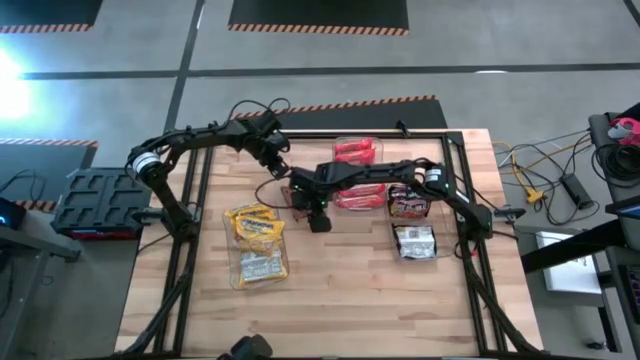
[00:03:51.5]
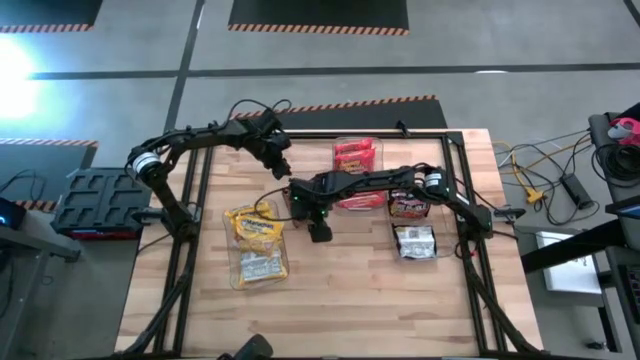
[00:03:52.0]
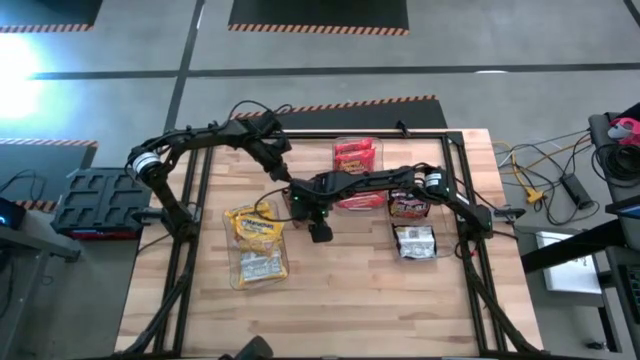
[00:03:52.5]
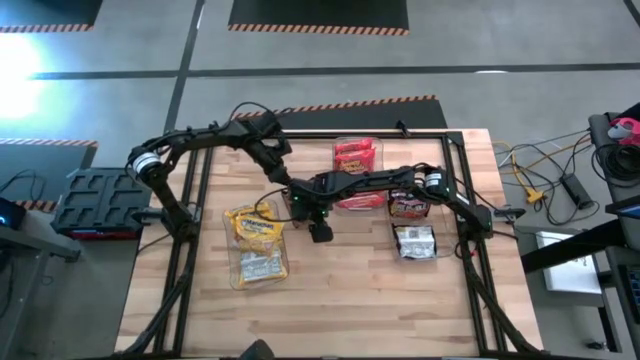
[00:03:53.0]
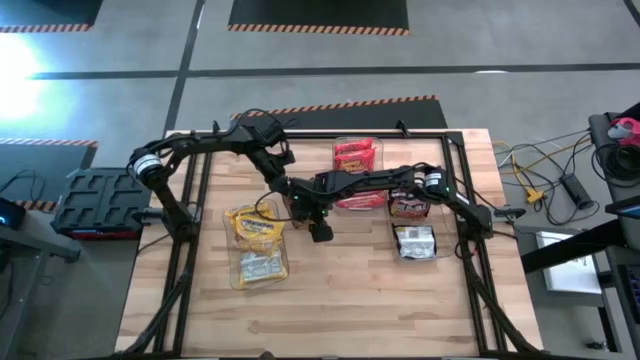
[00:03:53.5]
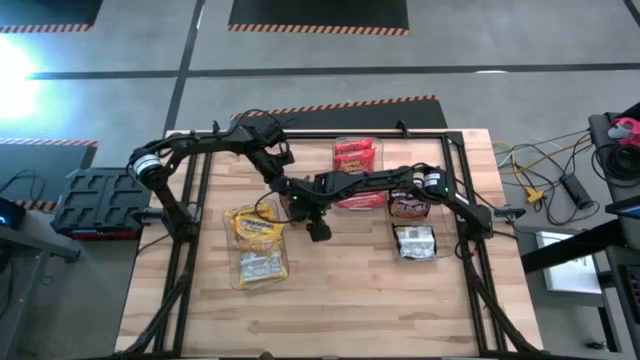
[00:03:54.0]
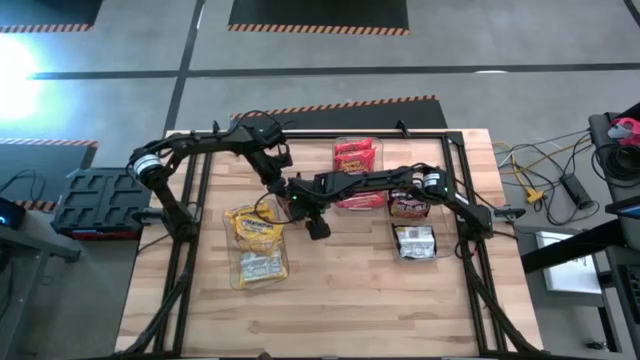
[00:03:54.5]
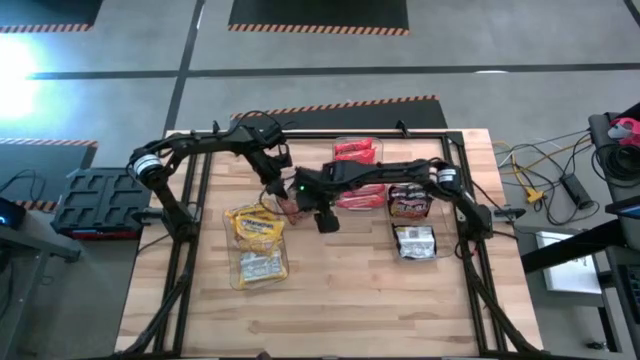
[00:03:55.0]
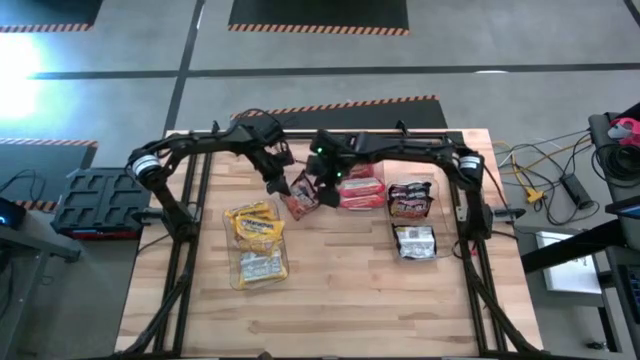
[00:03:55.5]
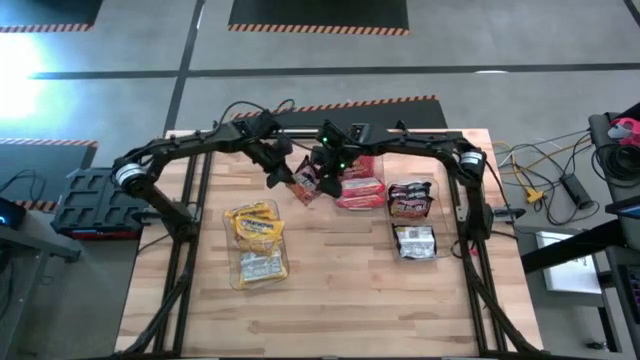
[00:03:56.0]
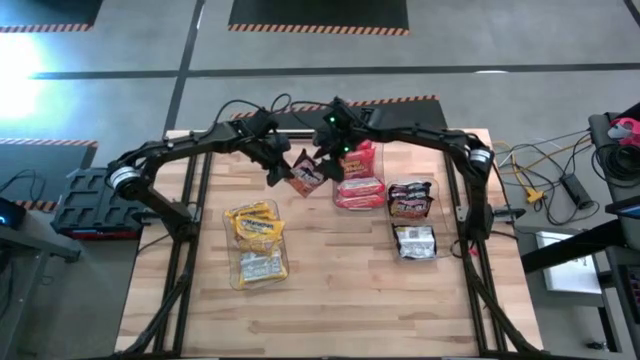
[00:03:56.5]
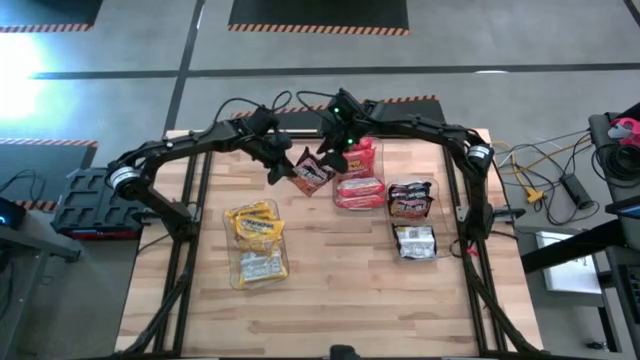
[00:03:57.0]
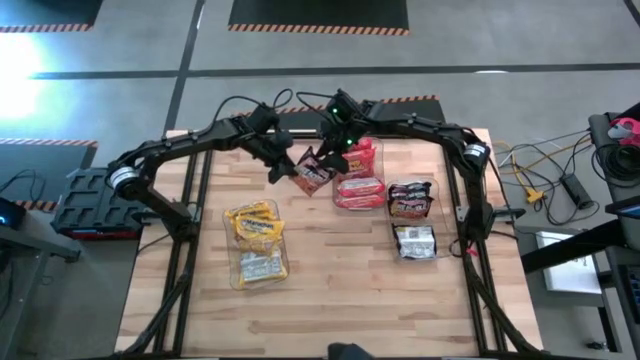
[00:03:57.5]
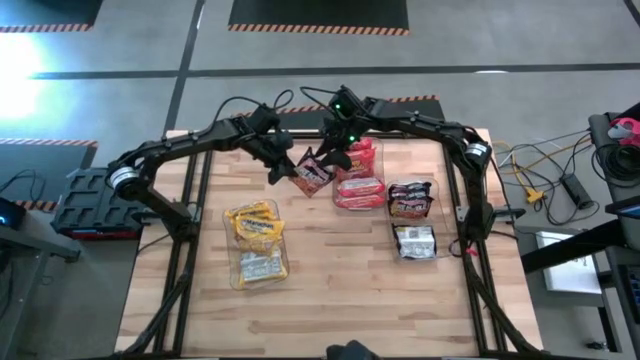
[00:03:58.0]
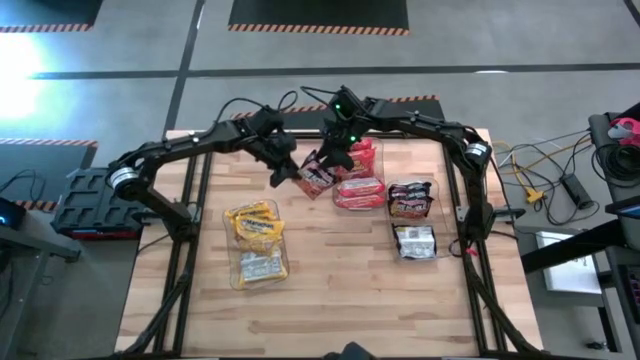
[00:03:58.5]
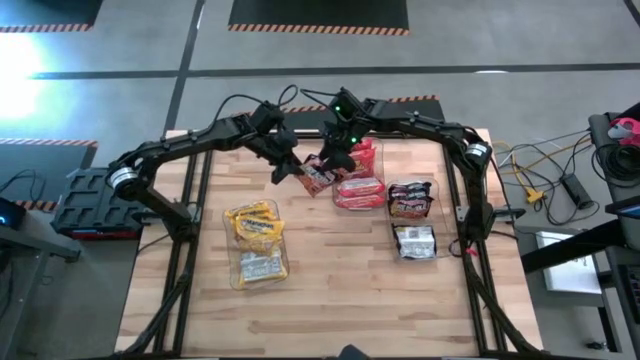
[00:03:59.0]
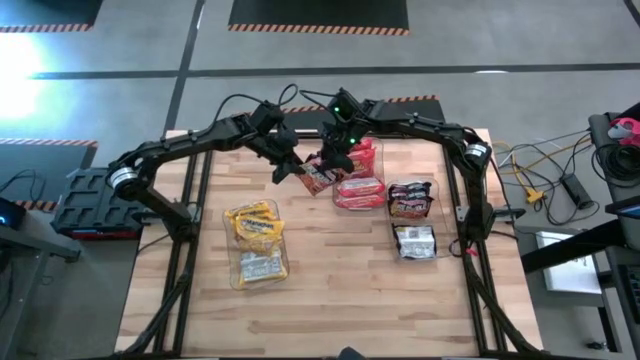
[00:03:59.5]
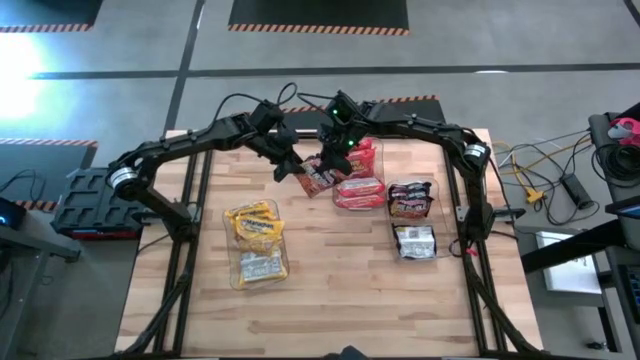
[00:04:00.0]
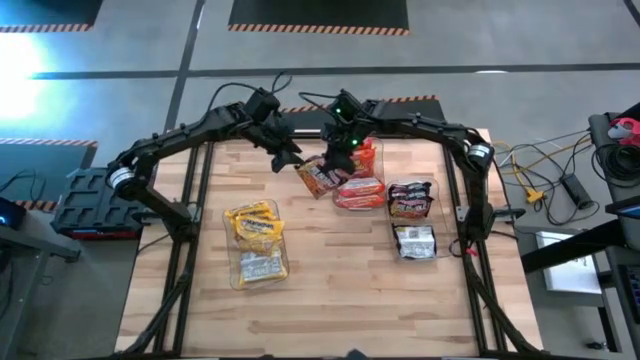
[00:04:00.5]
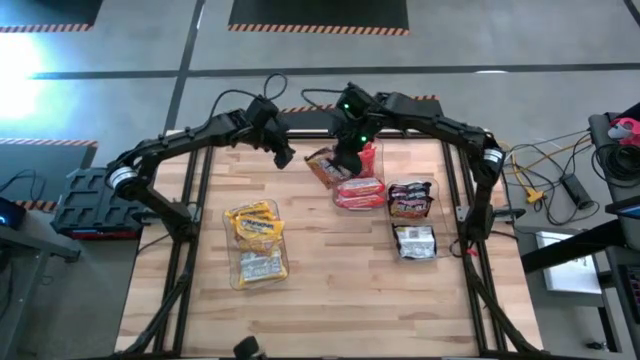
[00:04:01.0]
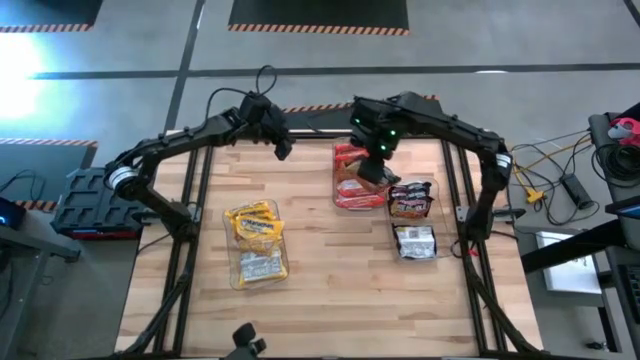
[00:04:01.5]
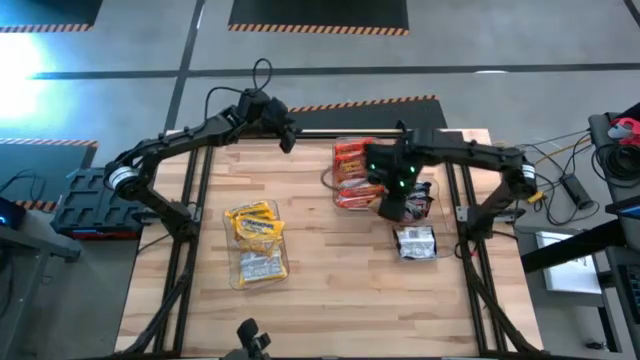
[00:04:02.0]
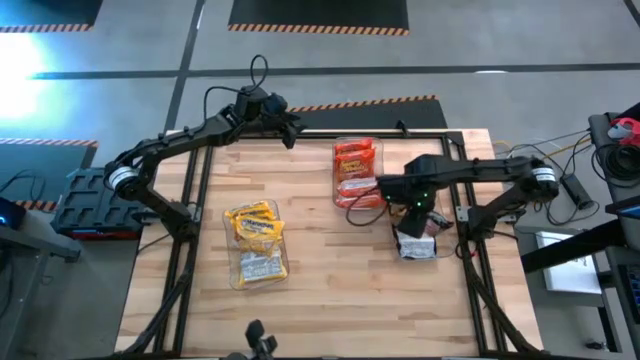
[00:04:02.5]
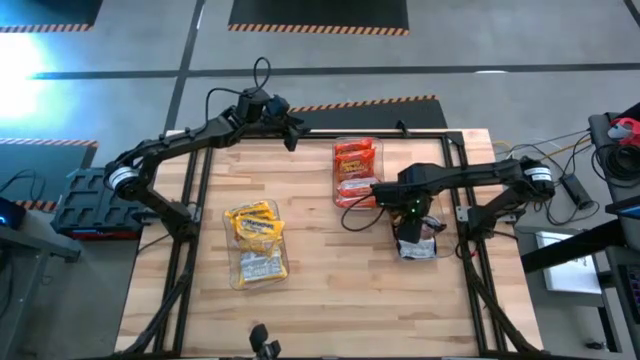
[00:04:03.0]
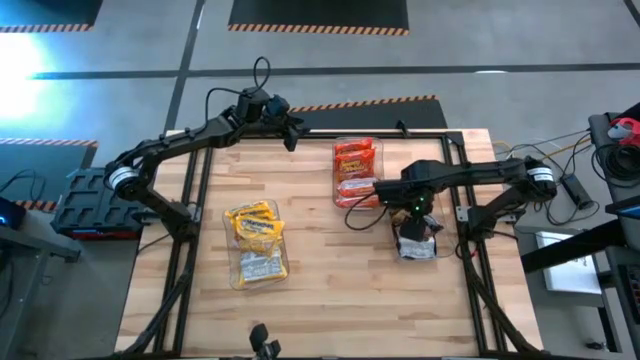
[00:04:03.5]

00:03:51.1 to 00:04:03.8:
Task: Sort Maruchan noodles
Put the black pack noodle into the bottom right transparent bin

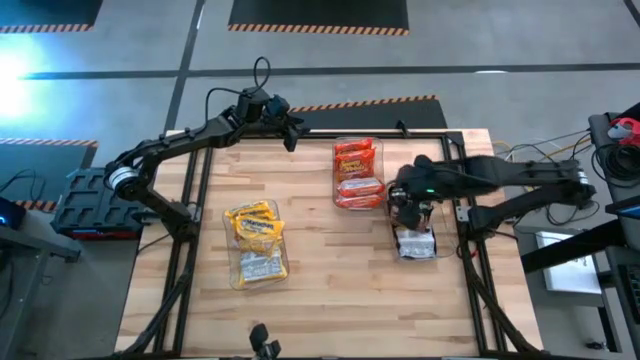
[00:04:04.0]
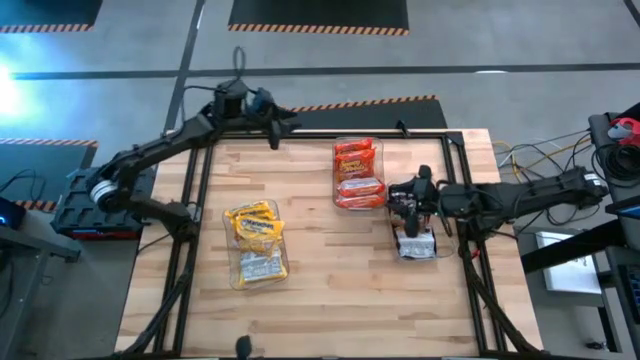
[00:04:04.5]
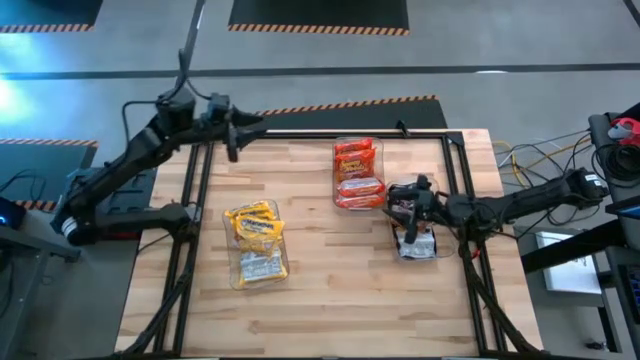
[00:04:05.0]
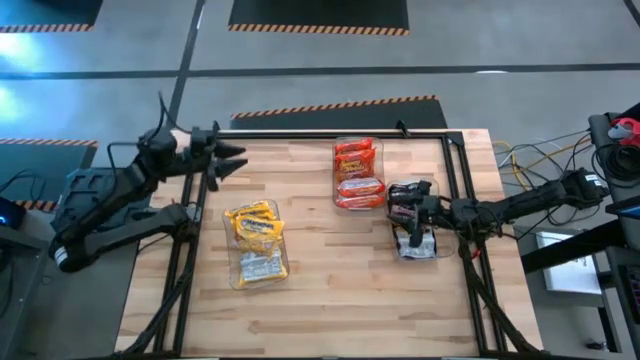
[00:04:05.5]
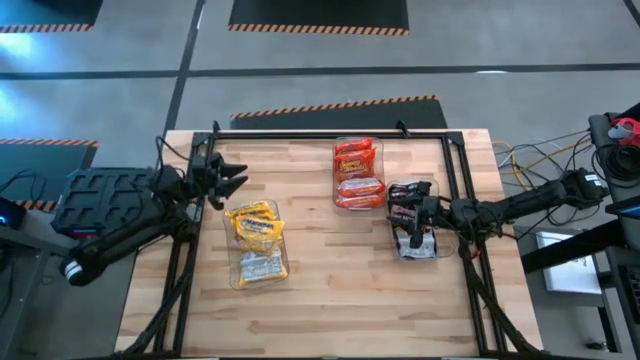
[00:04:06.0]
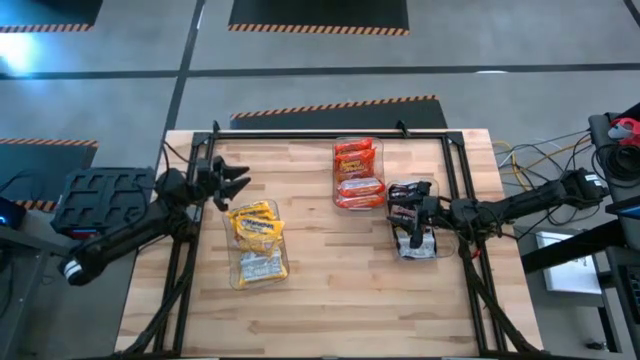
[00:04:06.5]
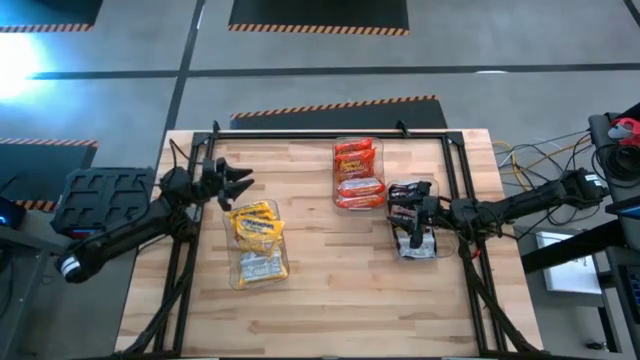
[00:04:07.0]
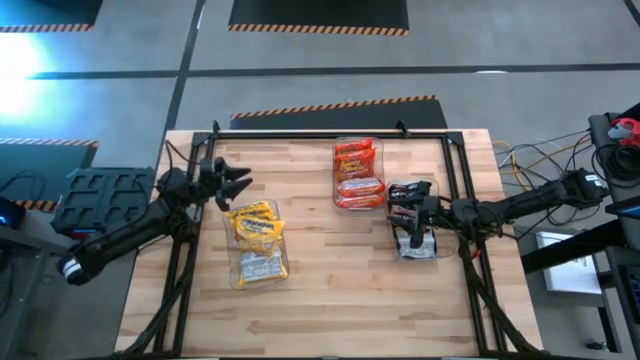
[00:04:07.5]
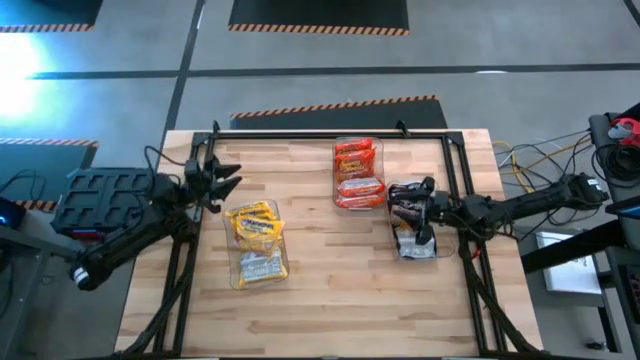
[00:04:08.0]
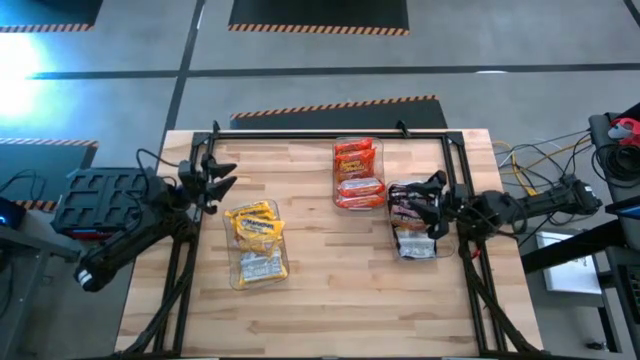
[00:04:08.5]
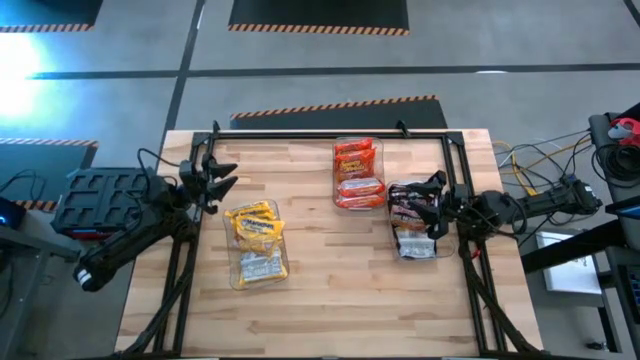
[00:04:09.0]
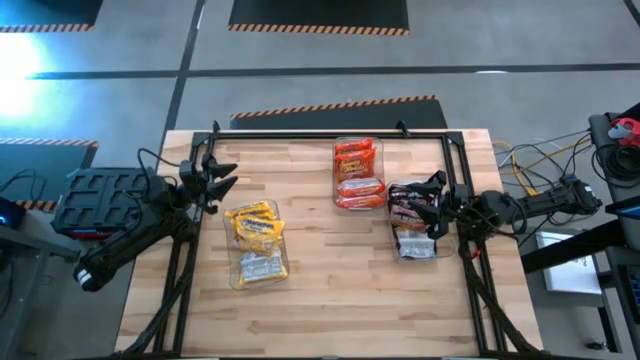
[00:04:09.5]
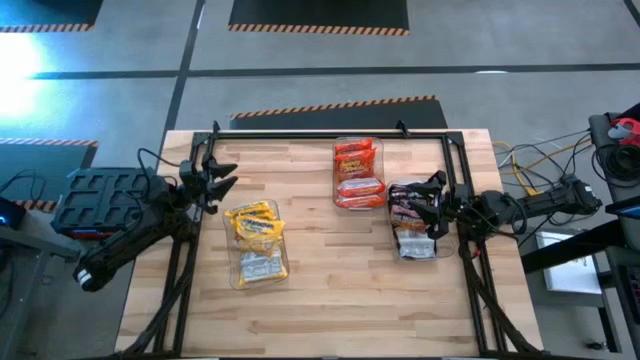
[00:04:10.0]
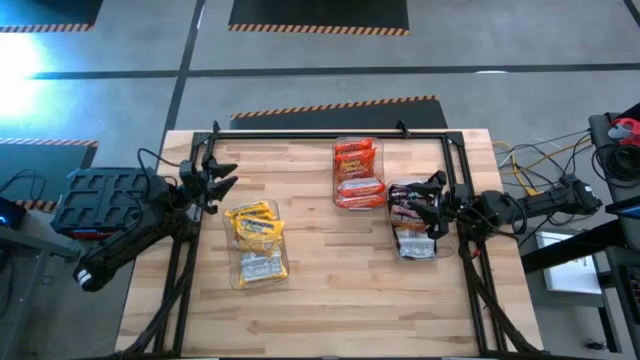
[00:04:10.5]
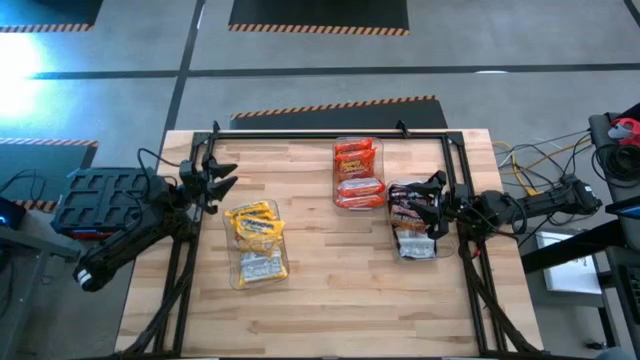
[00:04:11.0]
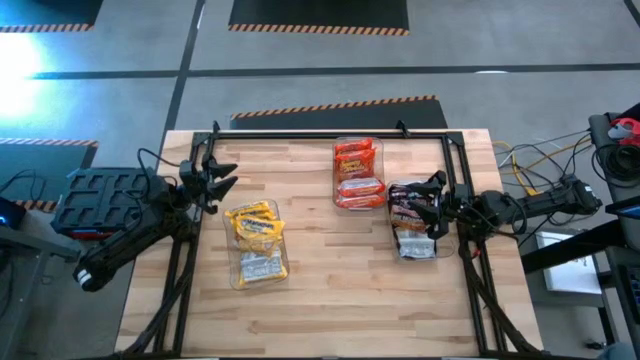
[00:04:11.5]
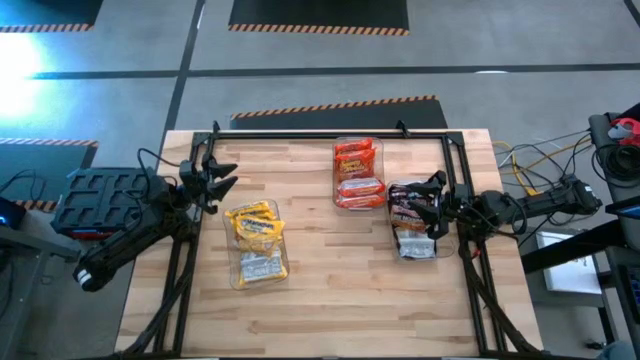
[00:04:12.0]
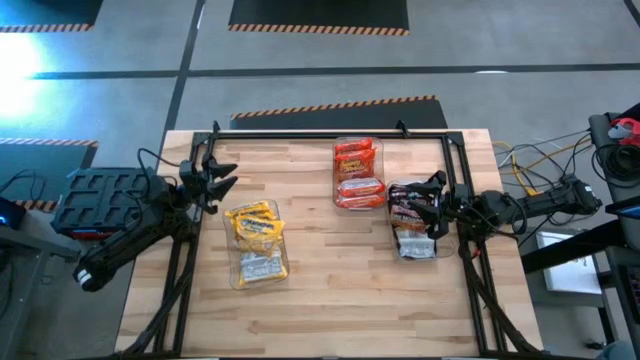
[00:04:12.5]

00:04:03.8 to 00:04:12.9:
Return to Home Position
